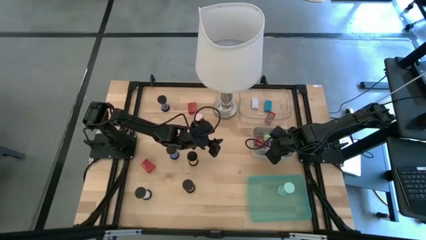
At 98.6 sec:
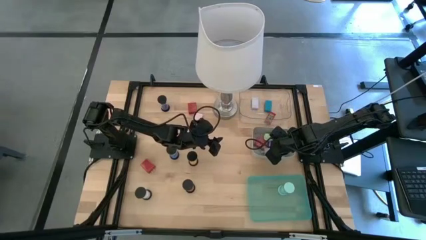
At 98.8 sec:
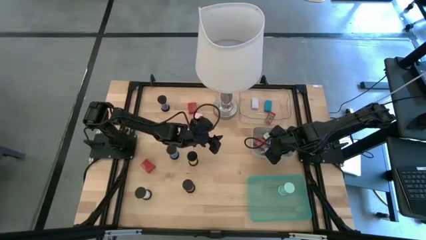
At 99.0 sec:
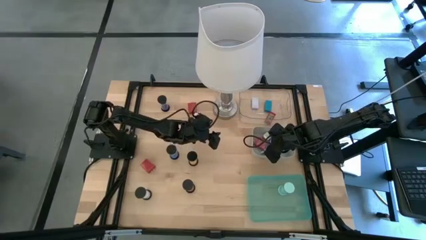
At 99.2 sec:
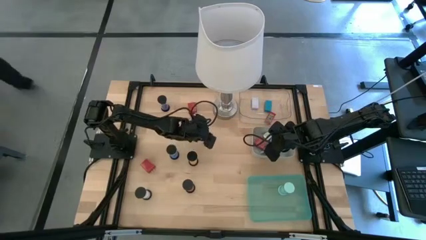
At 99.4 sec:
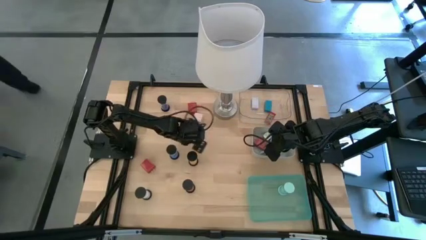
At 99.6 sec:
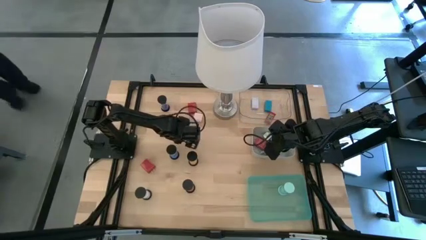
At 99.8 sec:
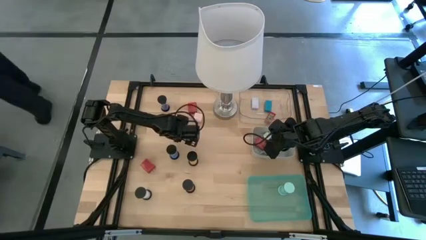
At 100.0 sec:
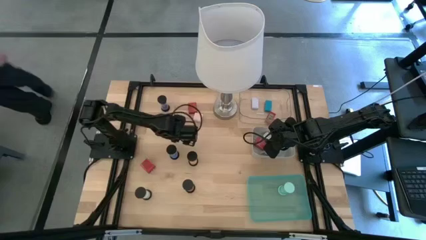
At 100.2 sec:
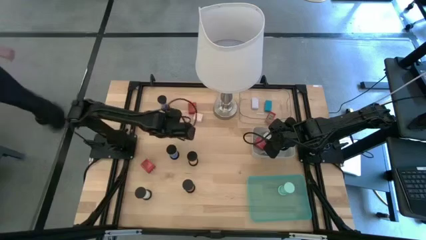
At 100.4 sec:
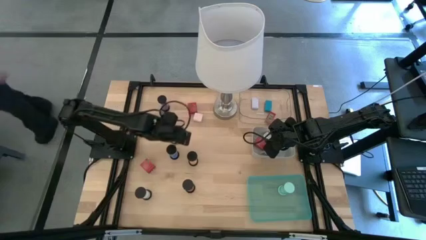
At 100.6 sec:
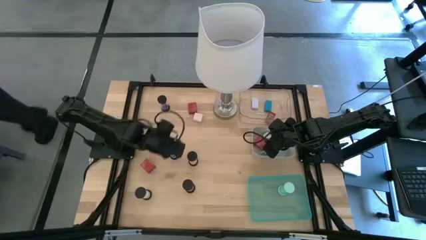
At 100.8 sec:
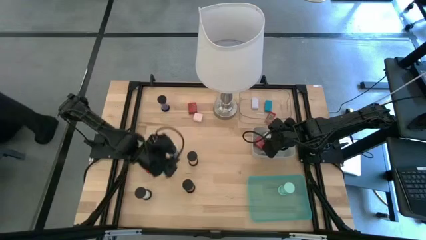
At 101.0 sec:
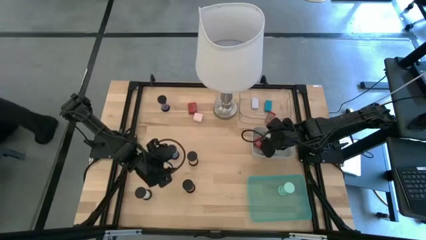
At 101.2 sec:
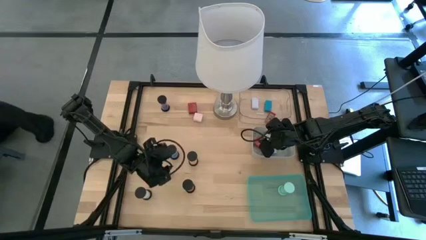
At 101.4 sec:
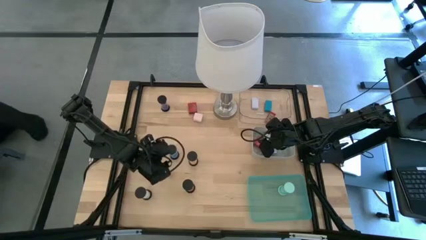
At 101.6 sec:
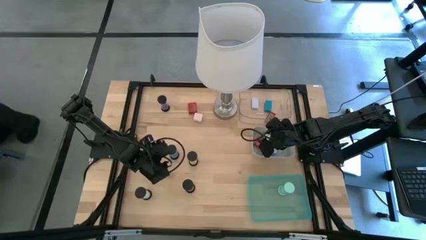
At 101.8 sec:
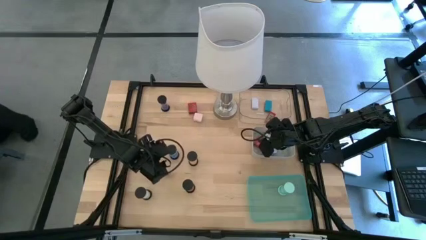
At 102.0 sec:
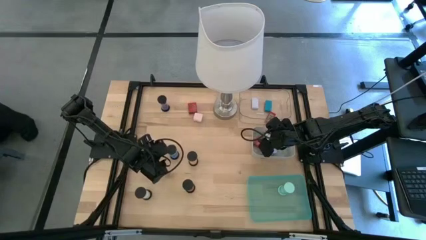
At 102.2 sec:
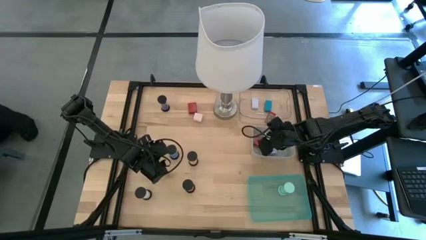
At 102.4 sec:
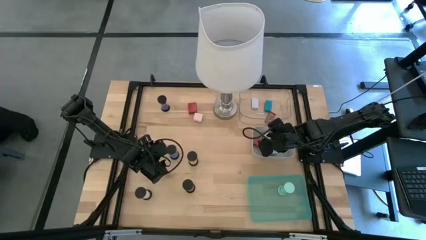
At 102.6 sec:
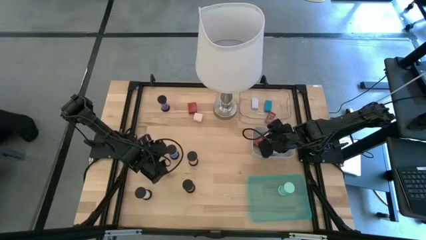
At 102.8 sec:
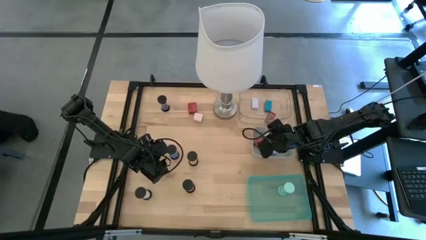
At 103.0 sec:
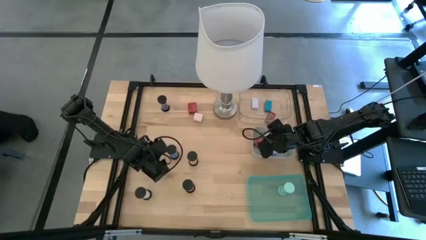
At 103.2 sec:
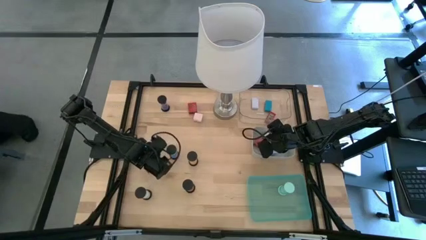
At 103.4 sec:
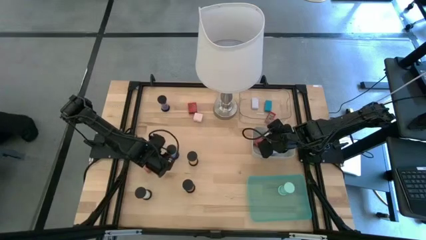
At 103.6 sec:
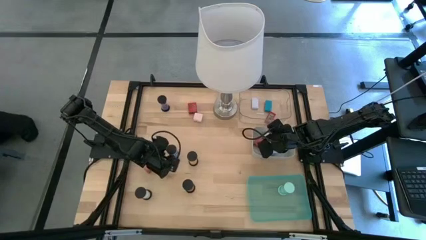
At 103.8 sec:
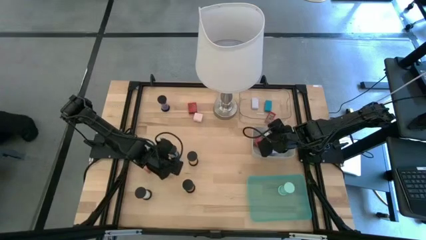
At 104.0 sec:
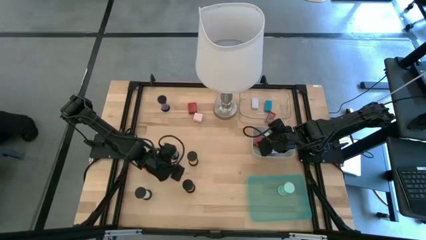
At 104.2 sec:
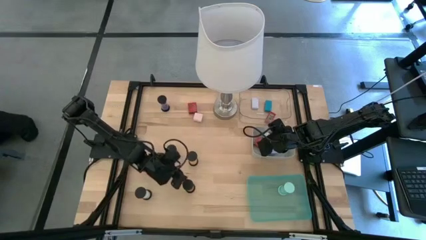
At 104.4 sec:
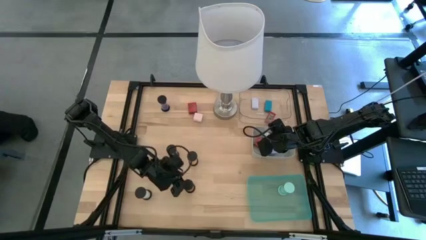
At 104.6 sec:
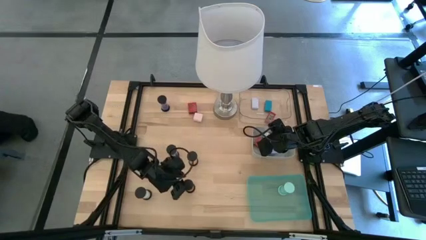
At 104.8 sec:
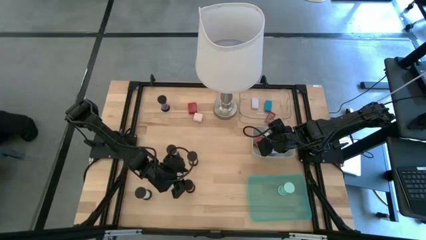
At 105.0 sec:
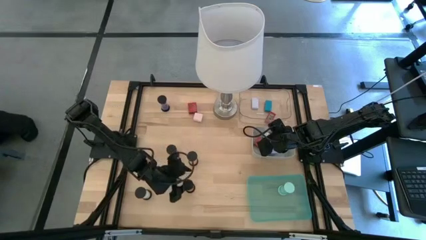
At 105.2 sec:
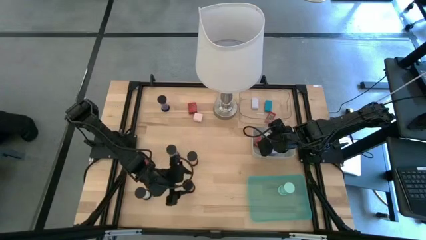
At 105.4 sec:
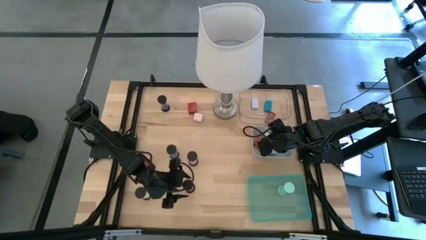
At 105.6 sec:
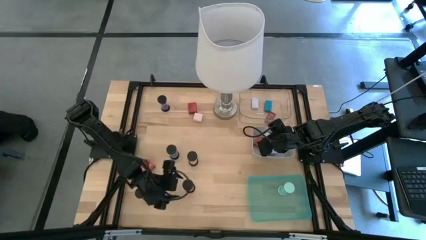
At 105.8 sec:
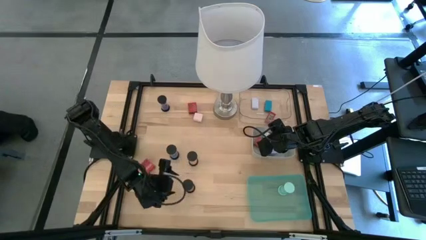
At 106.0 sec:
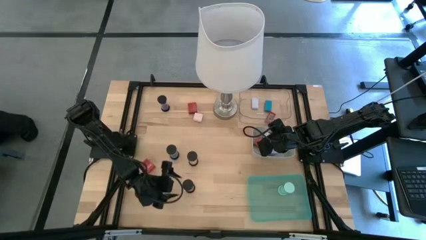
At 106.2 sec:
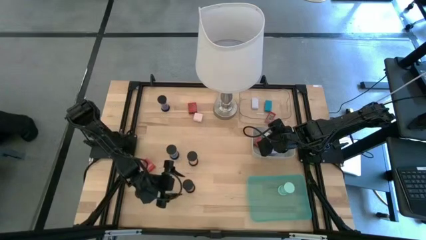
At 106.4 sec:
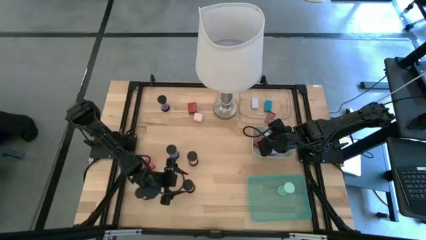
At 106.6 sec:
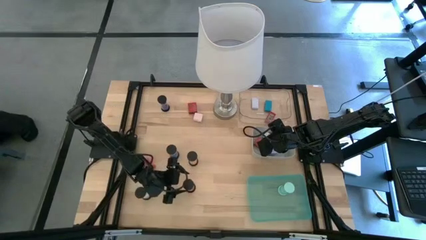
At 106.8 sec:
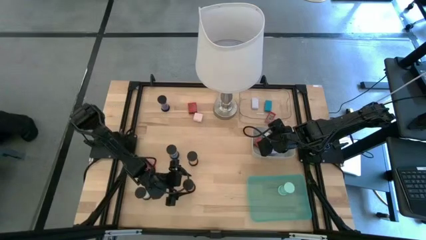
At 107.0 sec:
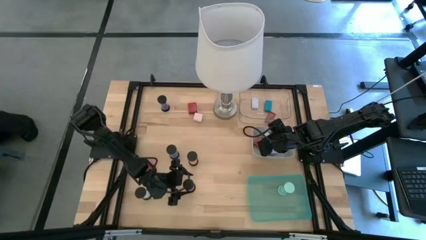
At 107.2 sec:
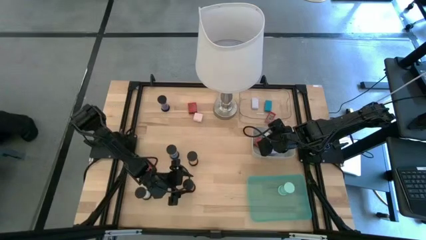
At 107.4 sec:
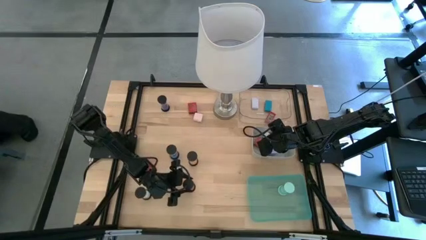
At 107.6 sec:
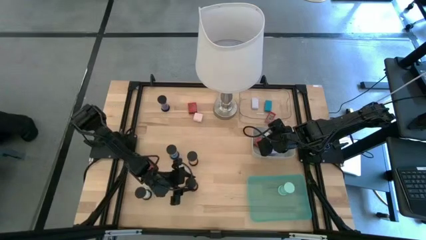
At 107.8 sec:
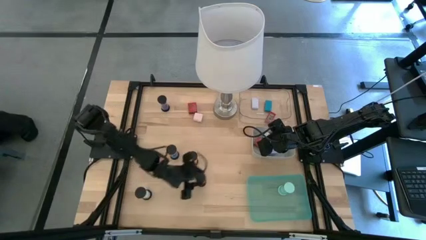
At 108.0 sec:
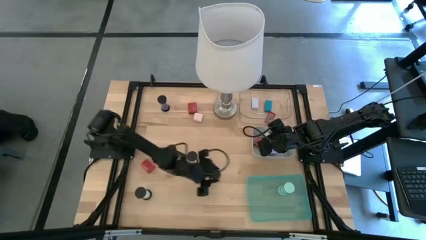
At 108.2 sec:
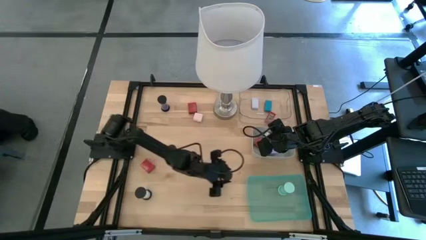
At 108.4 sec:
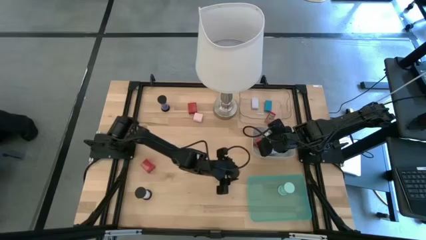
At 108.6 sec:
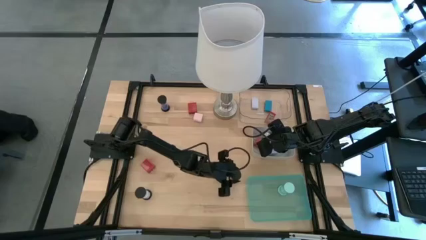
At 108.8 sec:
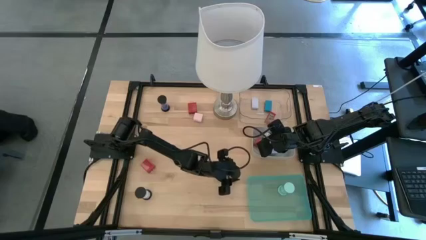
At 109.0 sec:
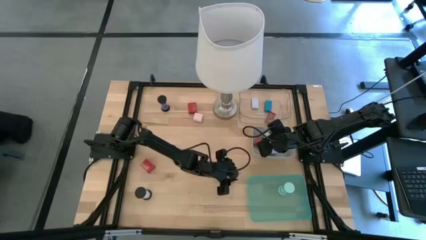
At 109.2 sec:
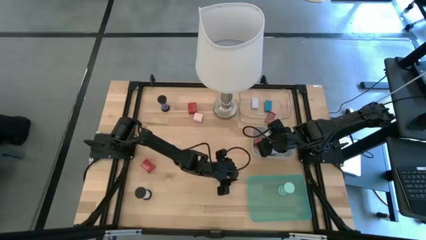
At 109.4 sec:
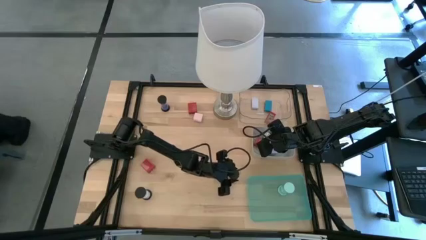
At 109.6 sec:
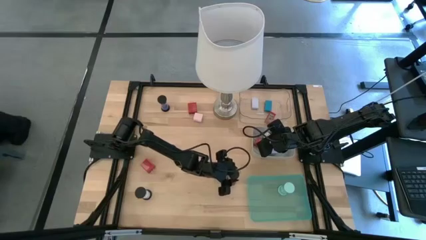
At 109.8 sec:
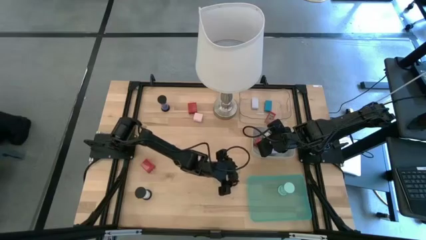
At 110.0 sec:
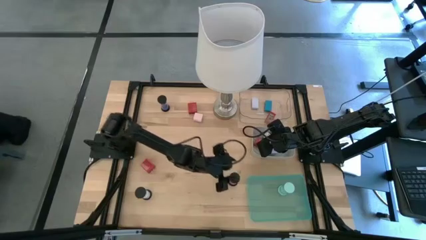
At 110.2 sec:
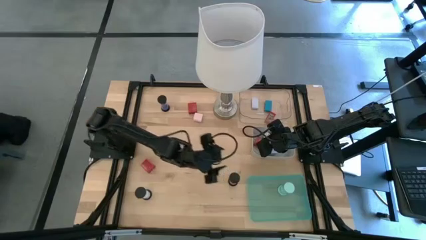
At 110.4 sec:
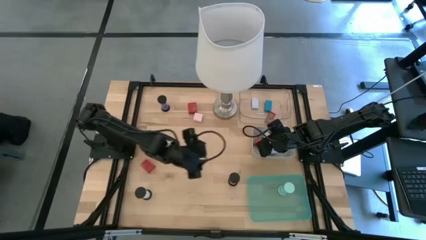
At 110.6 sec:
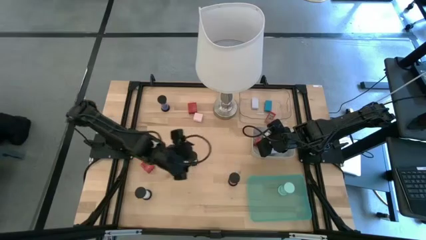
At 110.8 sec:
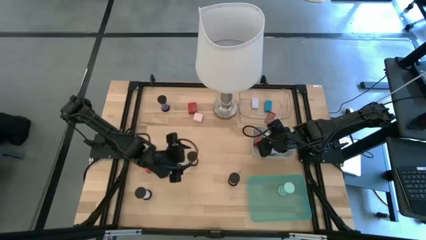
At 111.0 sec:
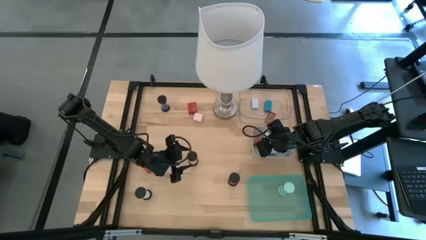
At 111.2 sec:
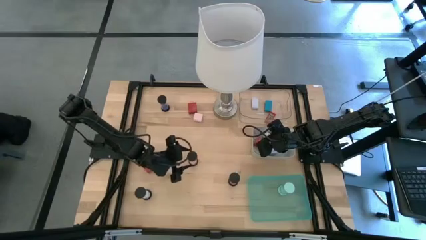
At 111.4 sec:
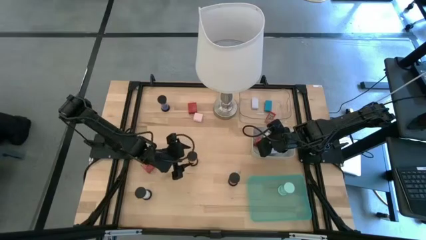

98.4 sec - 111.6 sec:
Task: Pick & Place Office items
Move the hourglasses to the middle of the table
